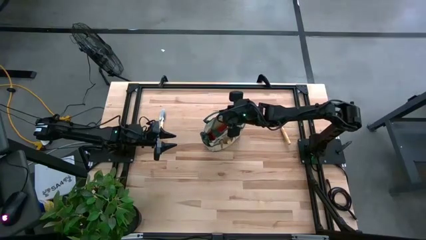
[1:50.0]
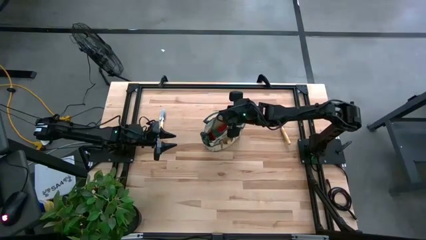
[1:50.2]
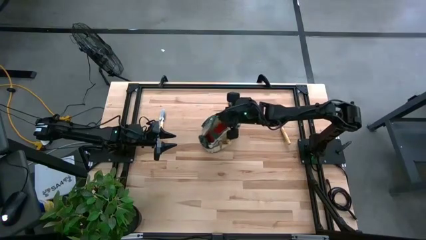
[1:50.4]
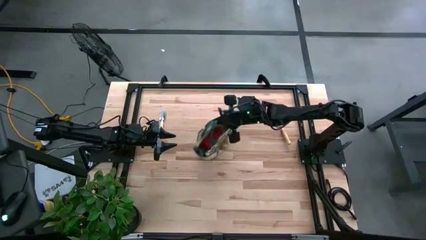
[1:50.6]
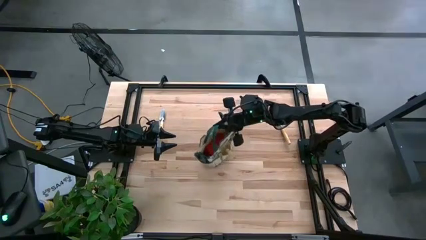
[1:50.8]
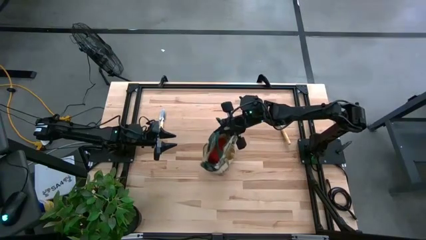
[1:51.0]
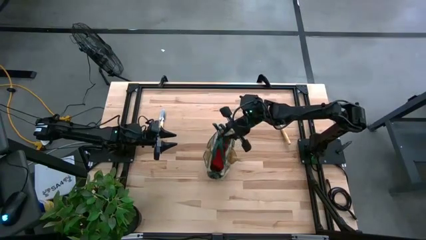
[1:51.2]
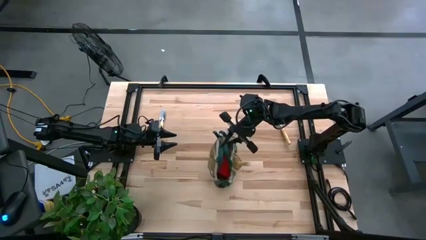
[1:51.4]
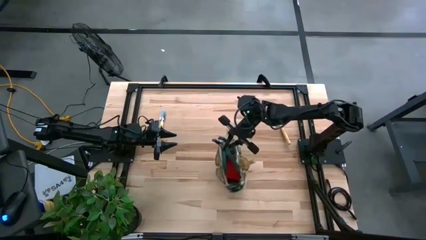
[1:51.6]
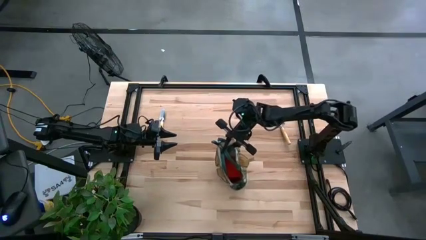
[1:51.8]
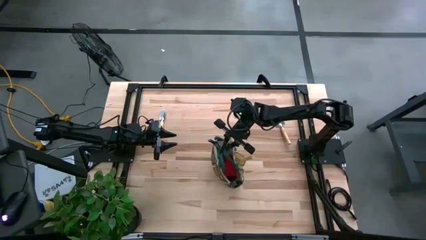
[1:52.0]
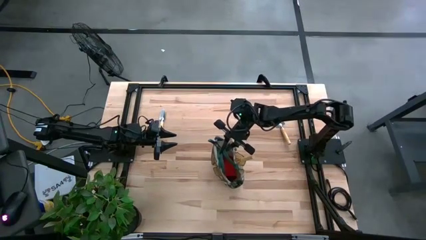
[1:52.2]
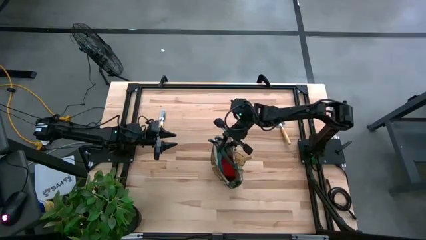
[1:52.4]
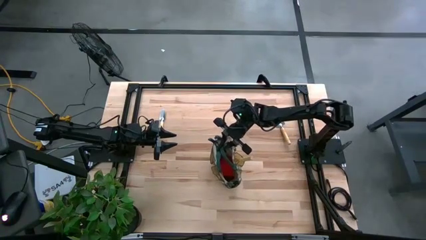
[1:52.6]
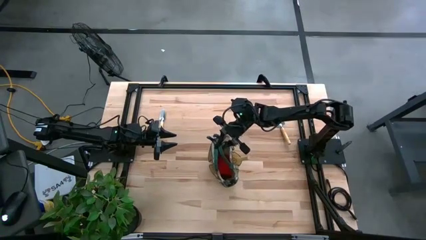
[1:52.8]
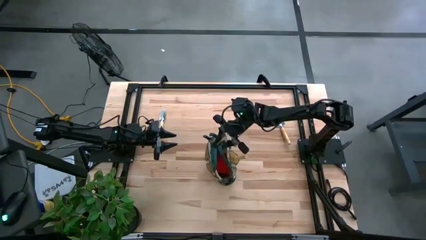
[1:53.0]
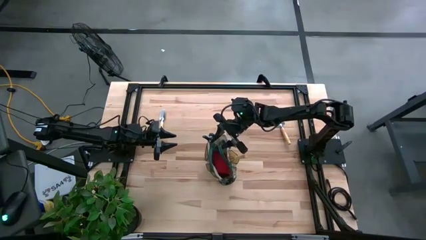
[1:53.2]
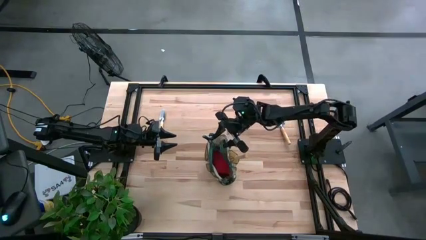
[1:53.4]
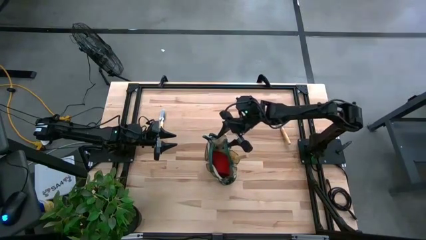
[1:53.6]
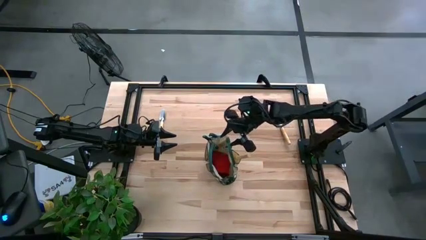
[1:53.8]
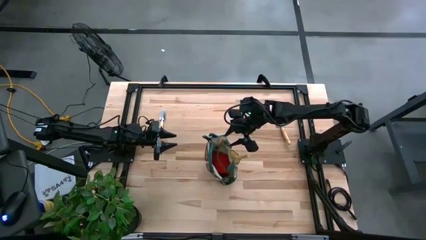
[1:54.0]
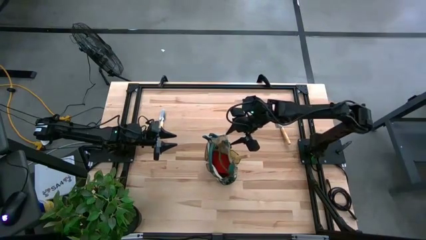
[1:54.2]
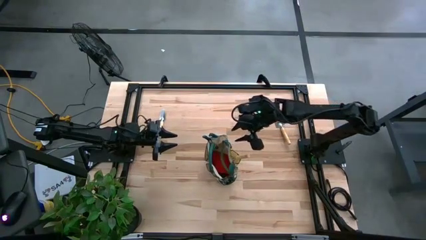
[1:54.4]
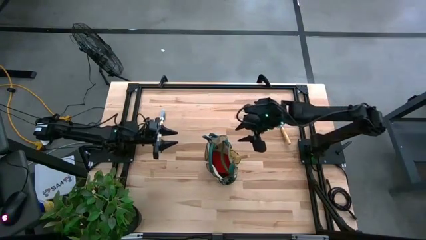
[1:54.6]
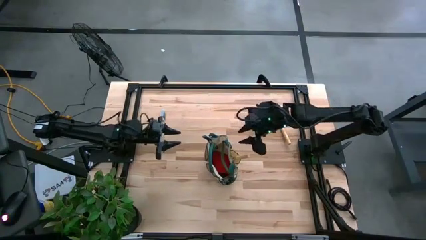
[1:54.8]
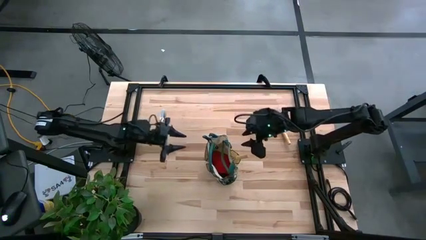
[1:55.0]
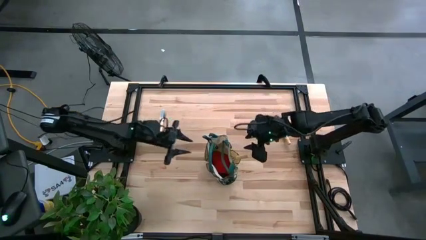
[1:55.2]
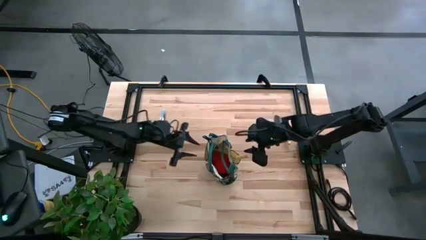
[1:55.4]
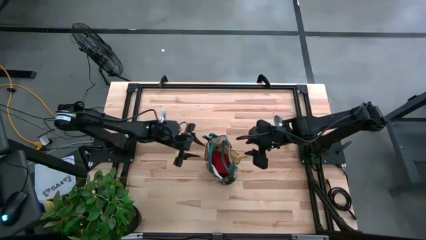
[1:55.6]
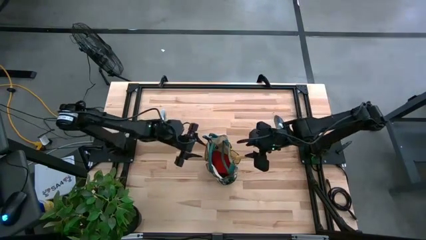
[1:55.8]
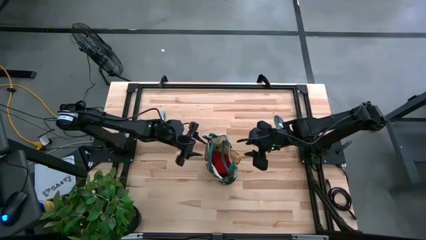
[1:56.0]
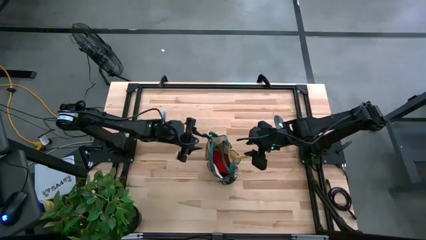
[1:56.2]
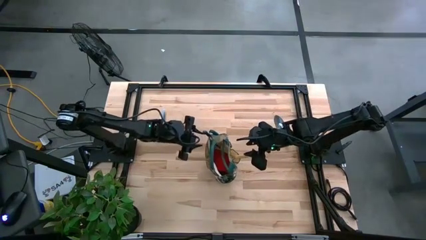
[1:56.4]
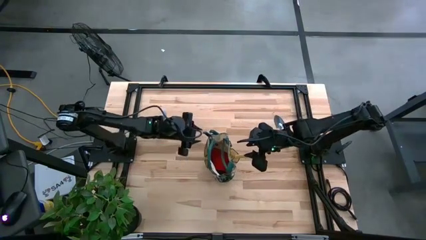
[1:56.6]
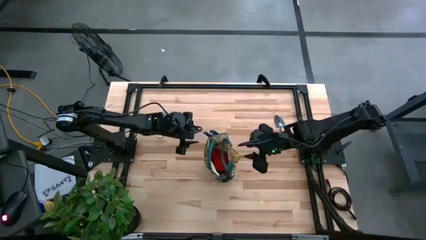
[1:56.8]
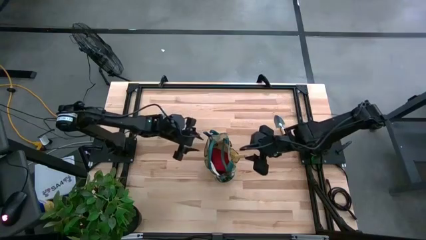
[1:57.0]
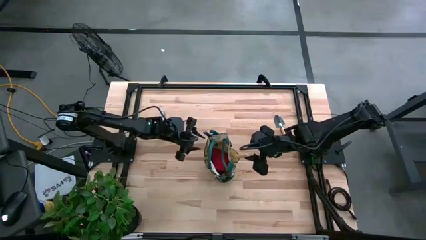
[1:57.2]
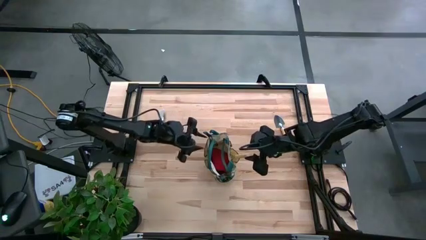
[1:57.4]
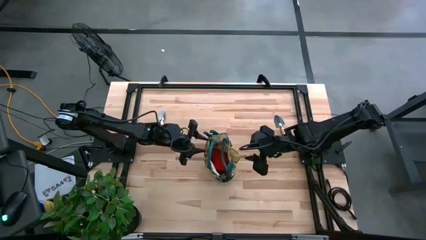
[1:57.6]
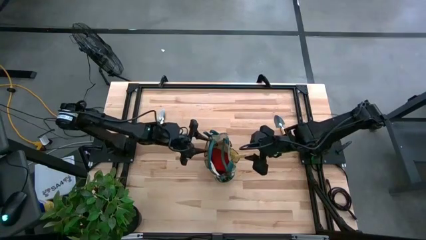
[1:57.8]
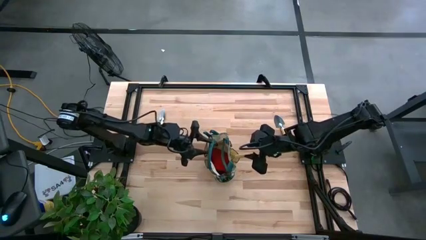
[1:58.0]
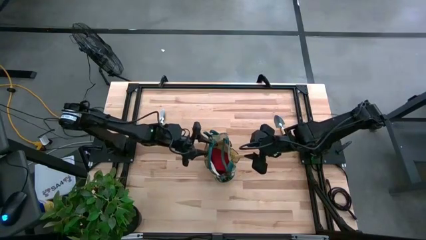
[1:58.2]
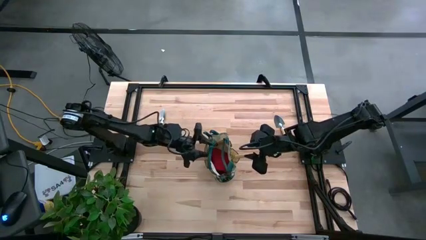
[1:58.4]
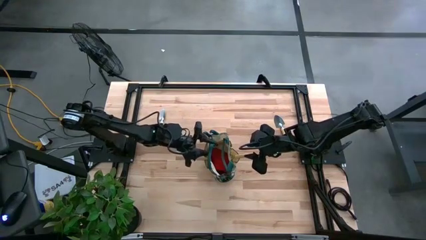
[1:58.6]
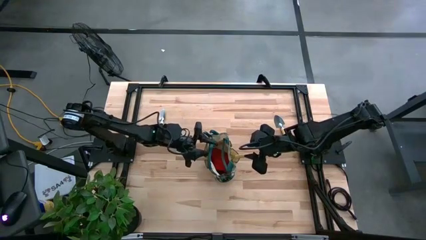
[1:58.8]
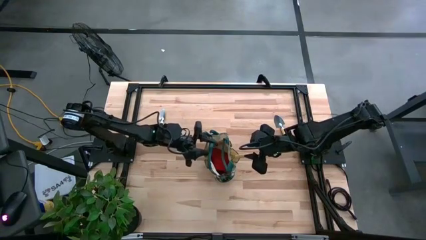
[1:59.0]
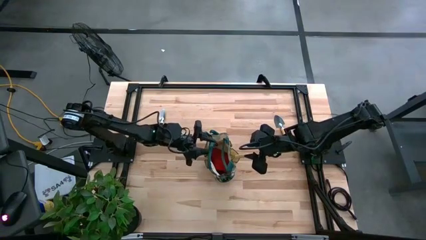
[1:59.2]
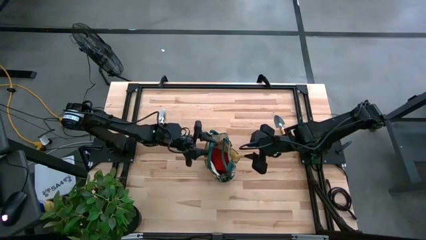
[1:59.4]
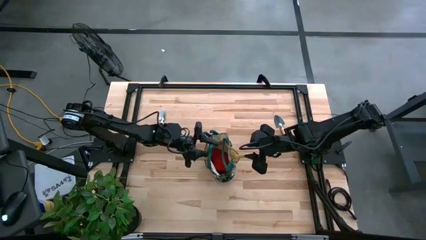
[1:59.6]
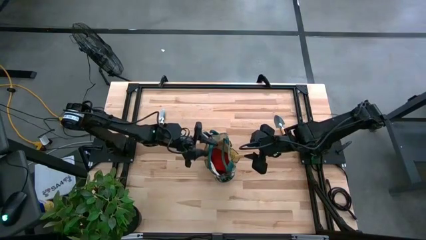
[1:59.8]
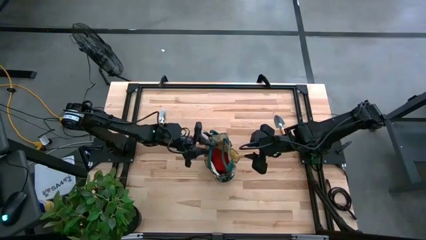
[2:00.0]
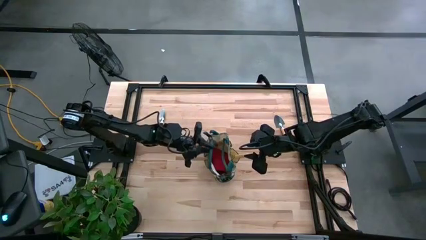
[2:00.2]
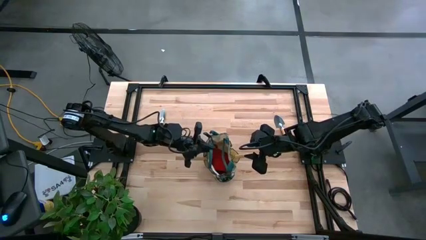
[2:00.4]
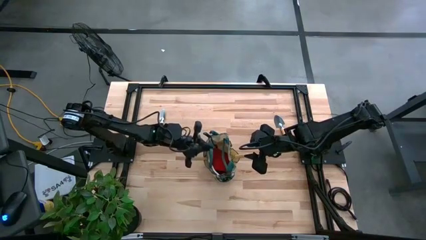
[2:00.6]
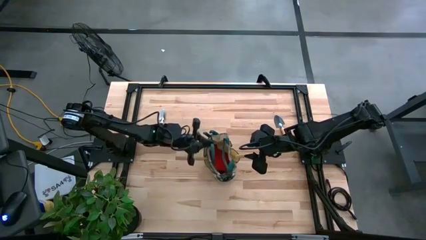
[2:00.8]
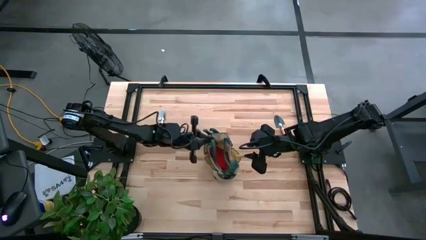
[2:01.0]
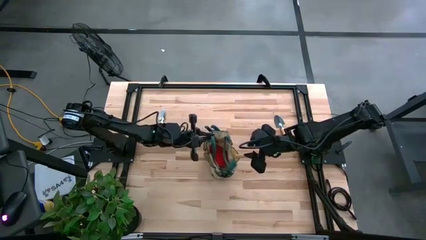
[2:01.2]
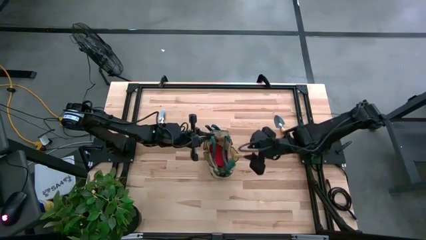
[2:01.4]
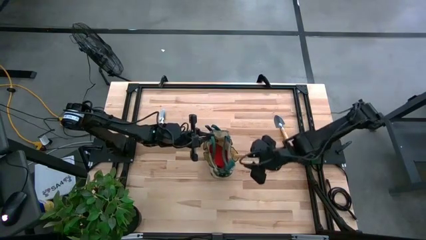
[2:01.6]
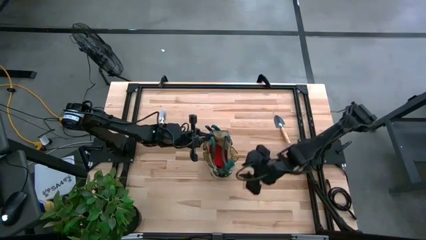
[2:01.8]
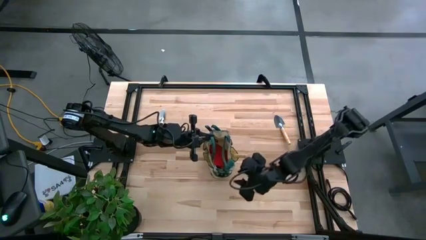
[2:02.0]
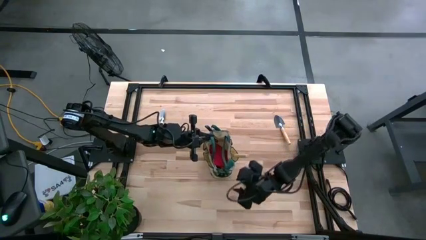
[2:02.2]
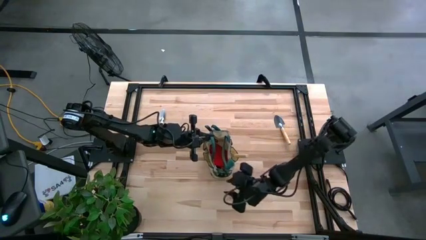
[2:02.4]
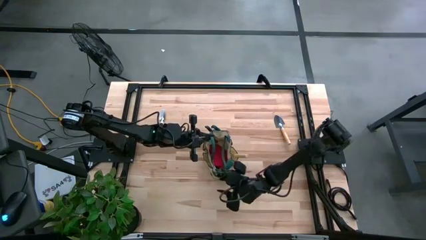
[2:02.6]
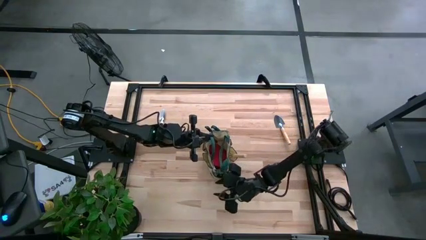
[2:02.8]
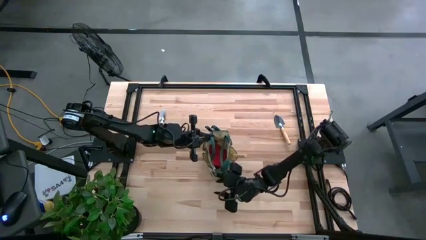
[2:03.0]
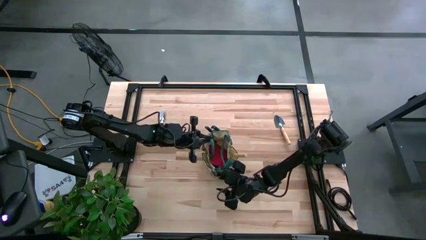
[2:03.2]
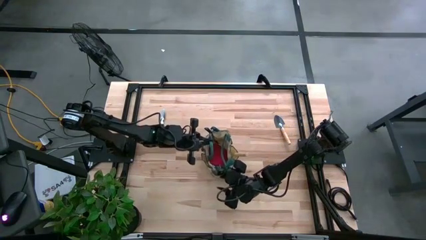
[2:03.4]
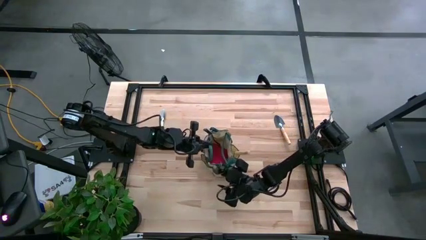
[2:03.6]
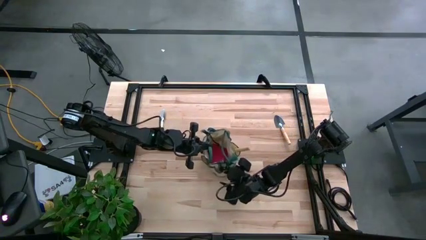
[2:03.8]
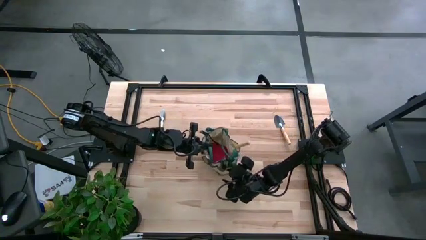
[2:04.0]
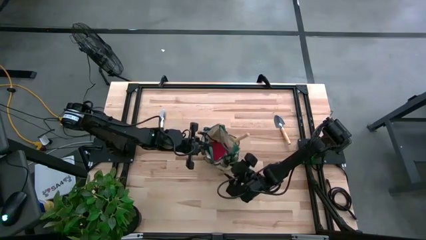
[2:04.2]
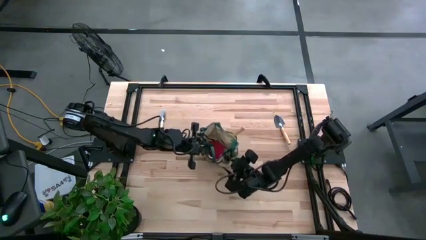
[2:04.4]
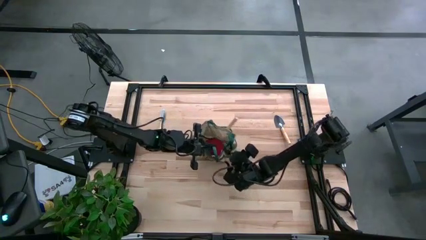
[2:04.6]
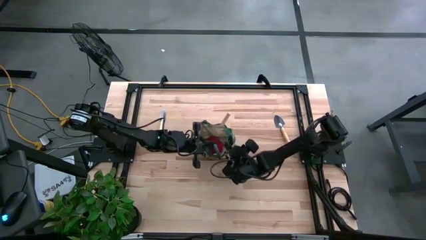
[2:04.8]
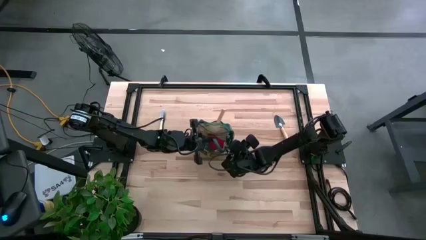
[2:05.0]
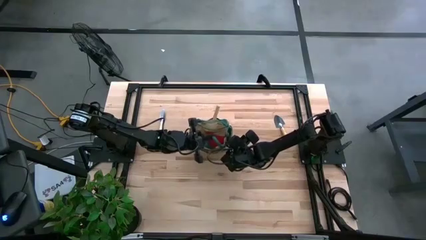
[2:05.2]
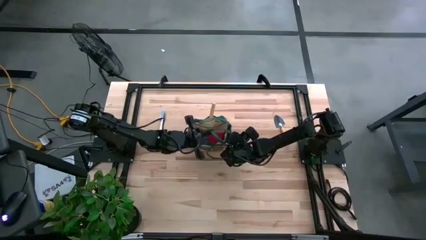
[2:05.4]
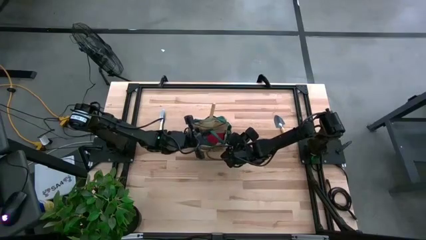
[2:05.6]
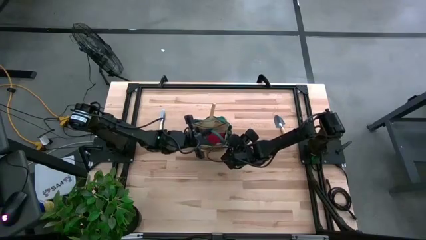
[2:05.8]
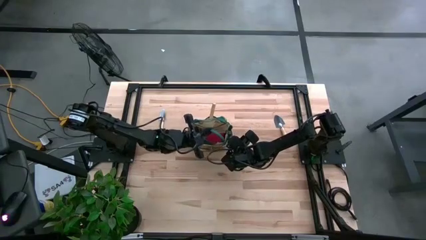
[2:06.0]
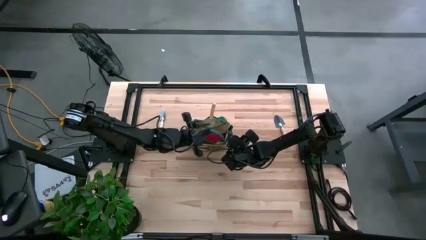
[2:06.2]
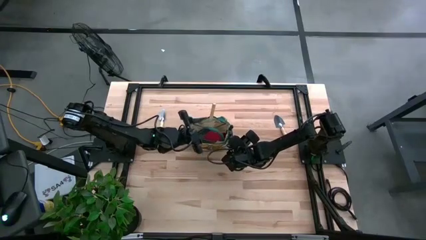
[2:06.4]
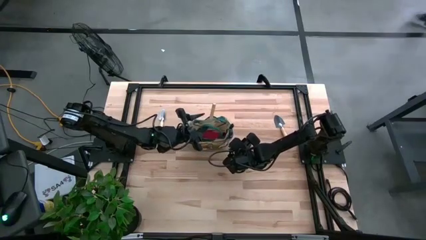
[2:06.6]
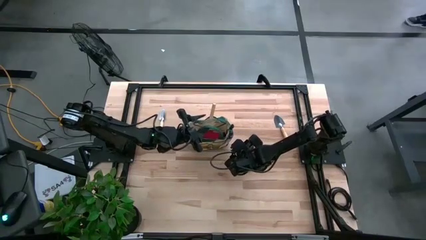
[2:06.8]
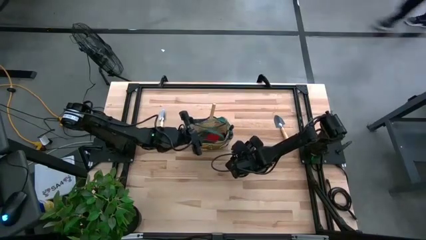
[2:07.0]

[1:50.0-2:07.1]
Task: Pick & Place Garden tools in Gardening bag
Adjust the light brown gardening bag
